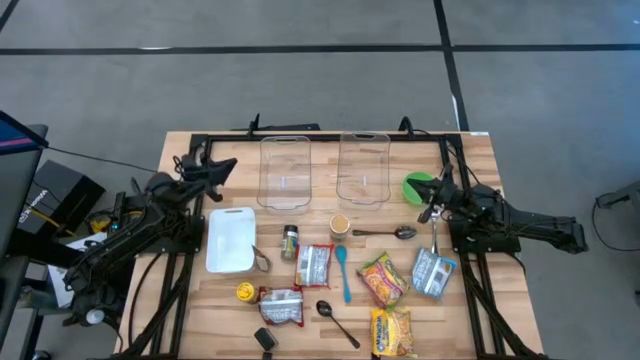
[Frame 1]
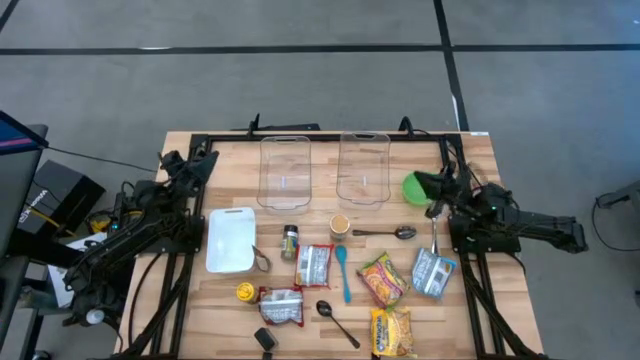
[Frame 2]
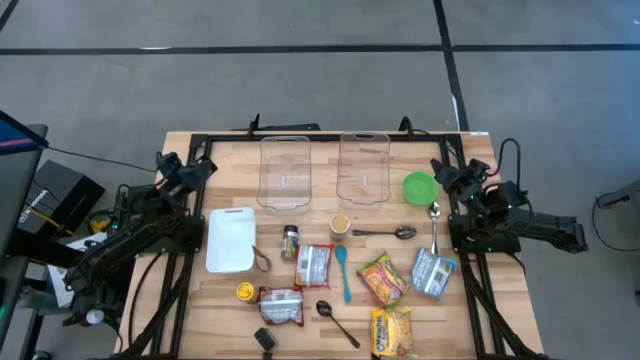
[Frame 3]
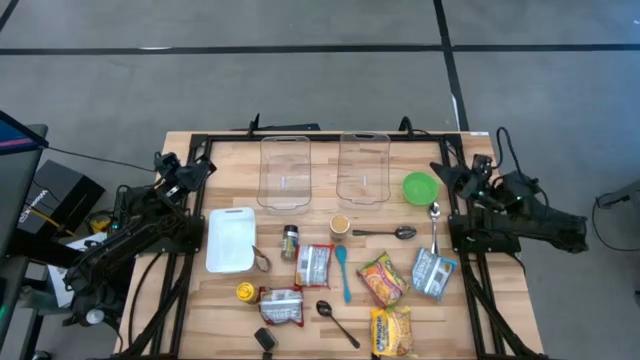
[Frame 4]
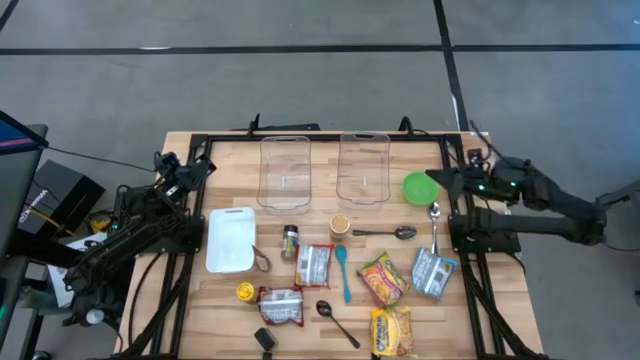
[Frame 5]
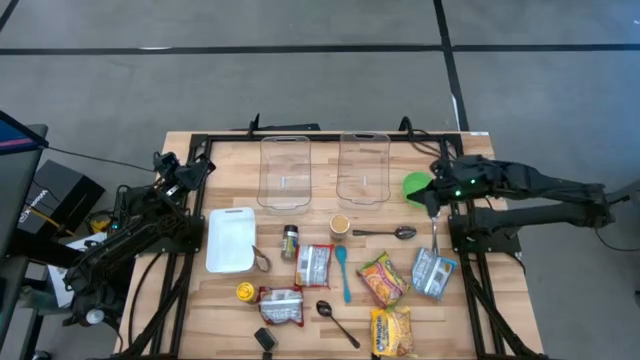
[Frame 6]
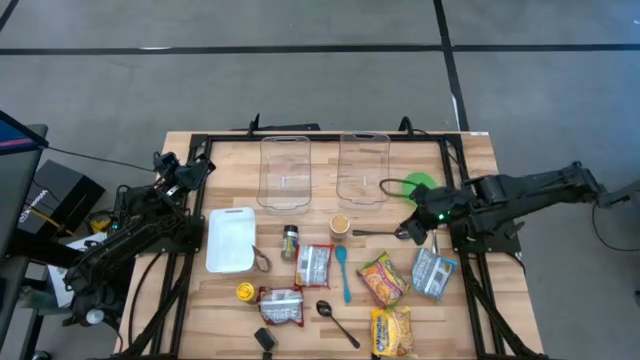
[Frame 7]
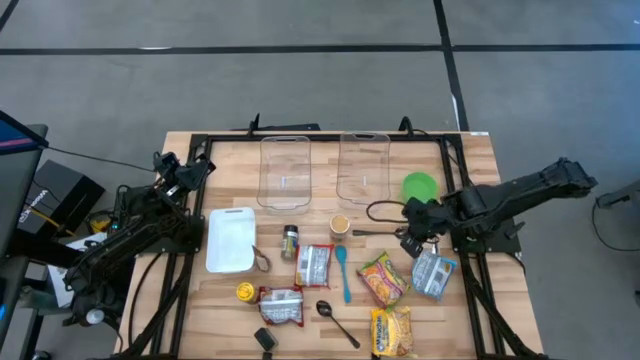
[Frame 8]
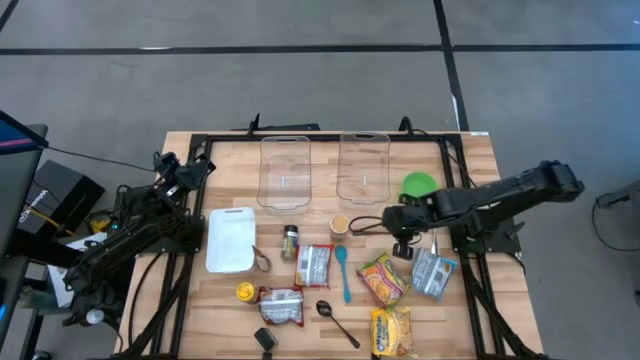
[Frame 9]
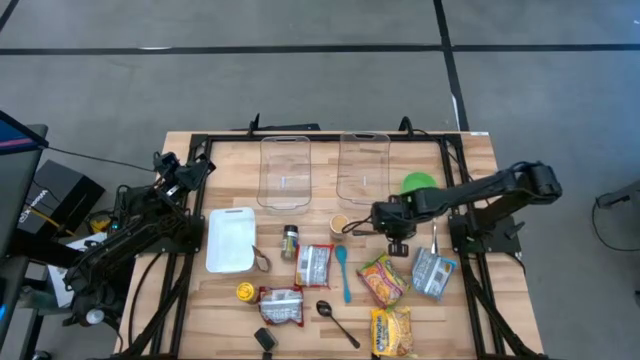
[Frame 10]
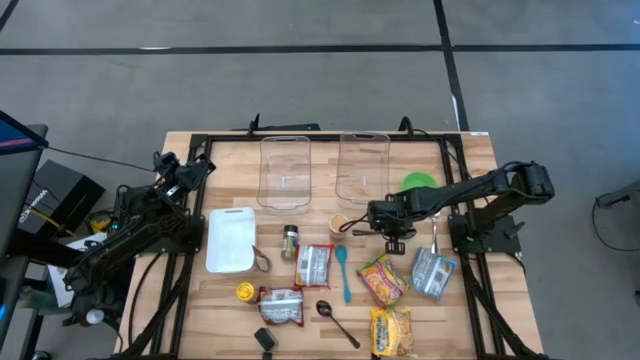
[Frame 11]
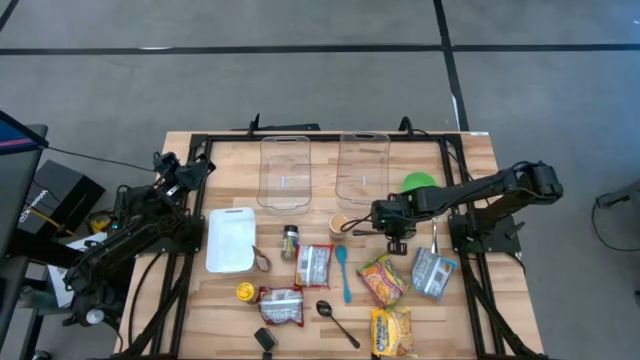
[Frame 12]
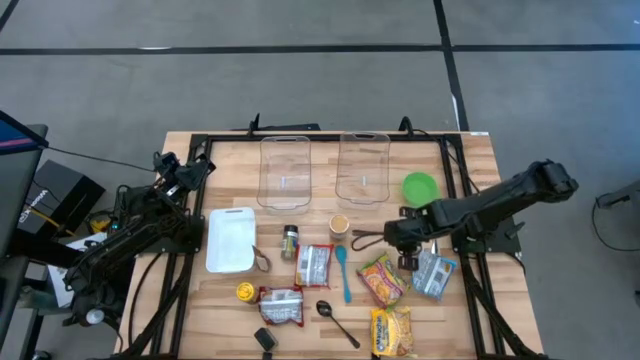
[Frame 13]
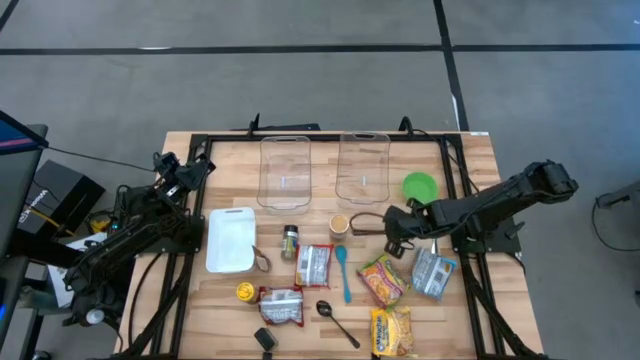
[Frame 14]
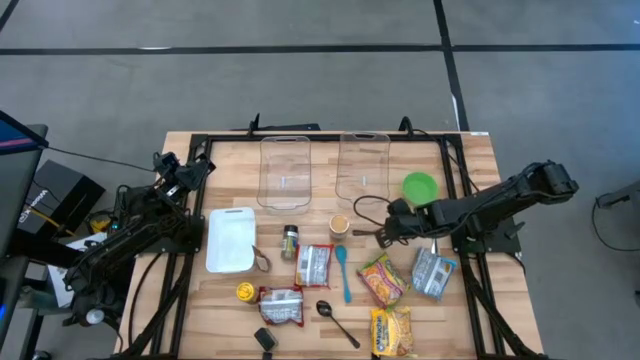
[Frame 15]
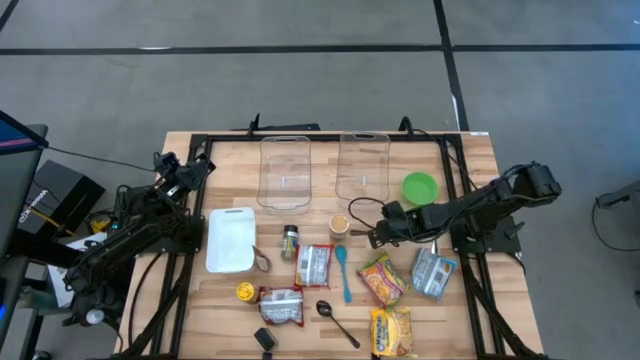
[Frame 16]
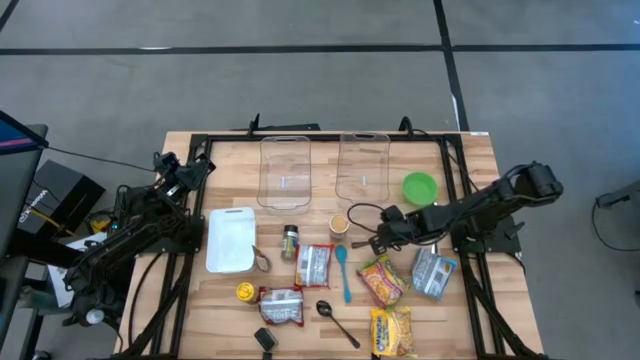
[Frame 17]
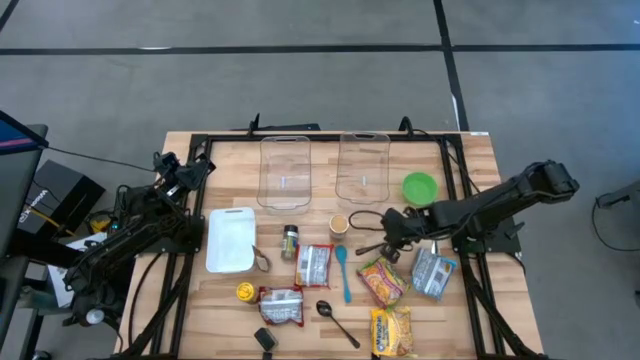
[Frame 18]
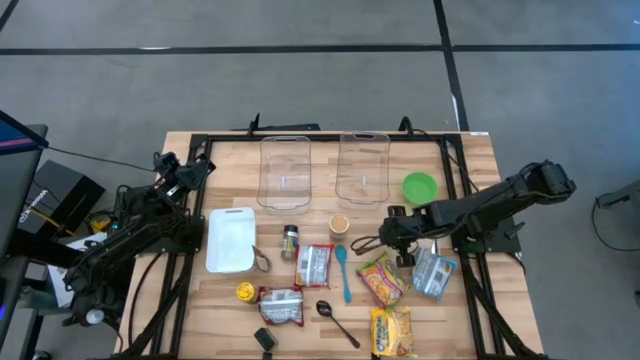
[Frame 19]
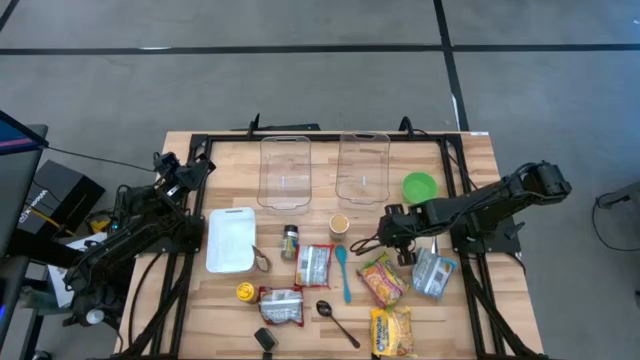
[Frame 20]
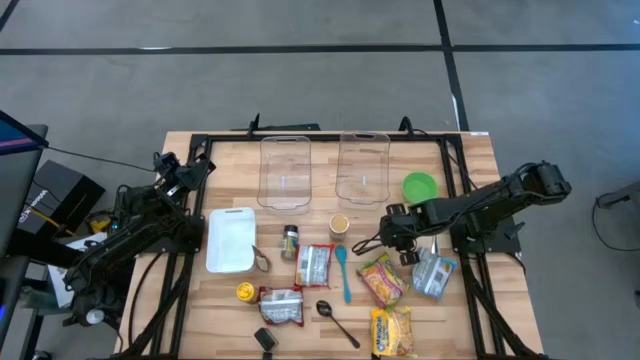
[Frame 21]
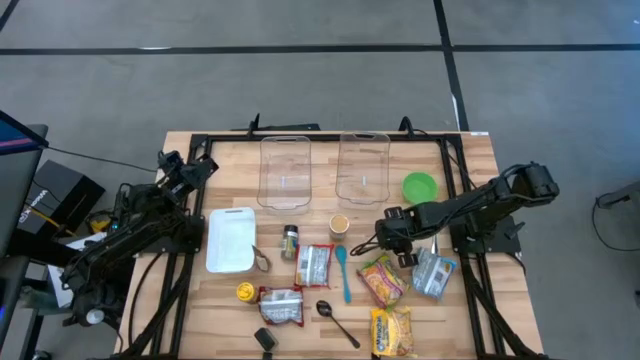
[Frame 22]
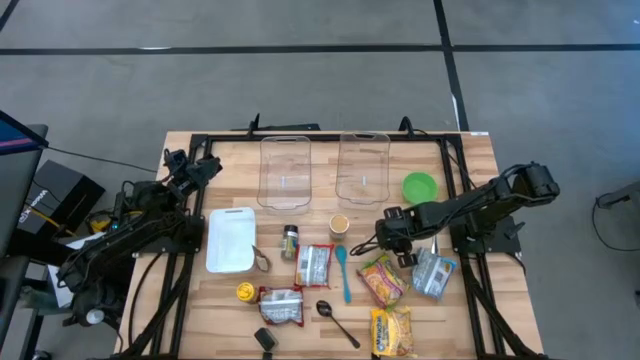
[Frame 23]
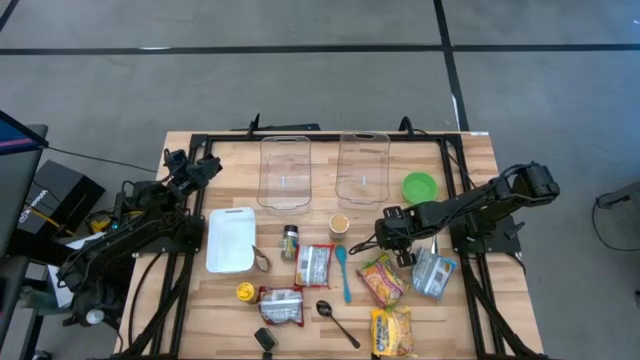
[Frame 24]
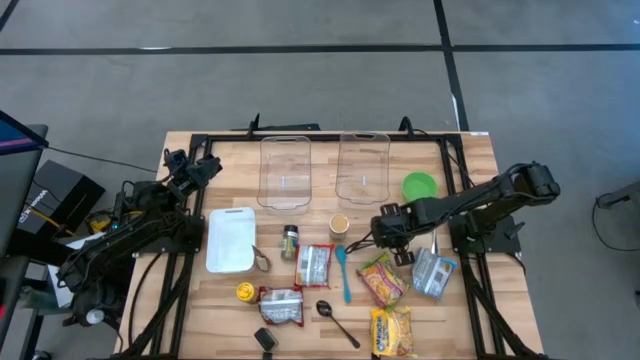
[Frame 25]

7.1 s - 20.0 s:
Task: Pick & Place Food Item
Put the top black spoon into the white bin

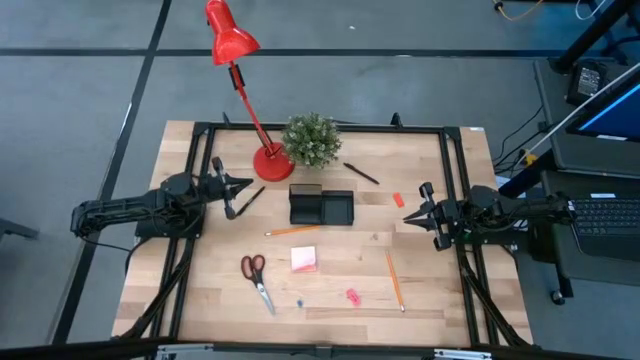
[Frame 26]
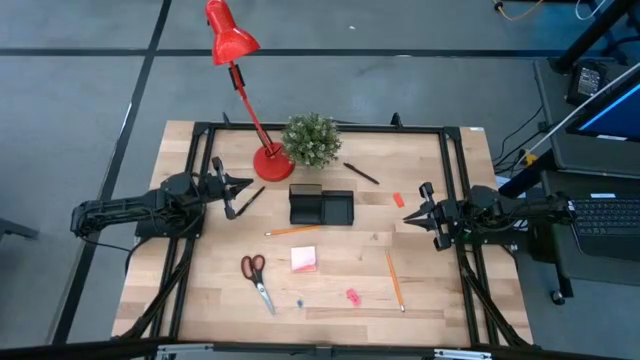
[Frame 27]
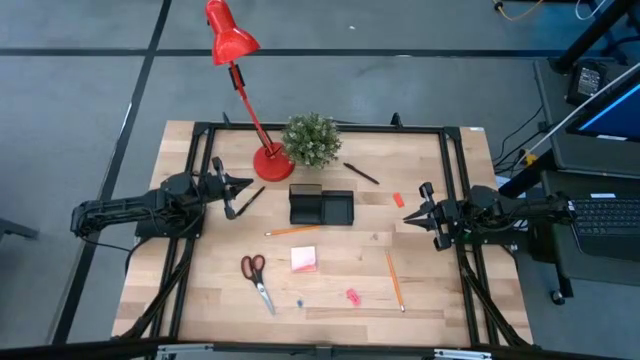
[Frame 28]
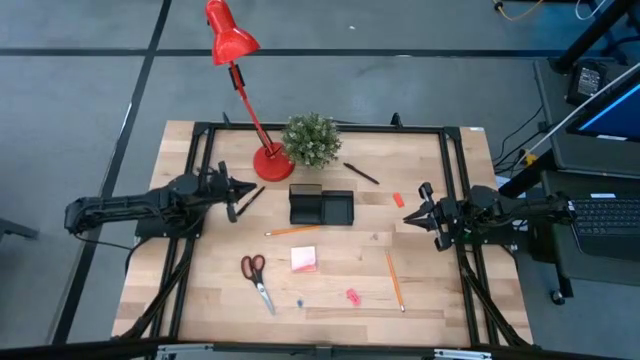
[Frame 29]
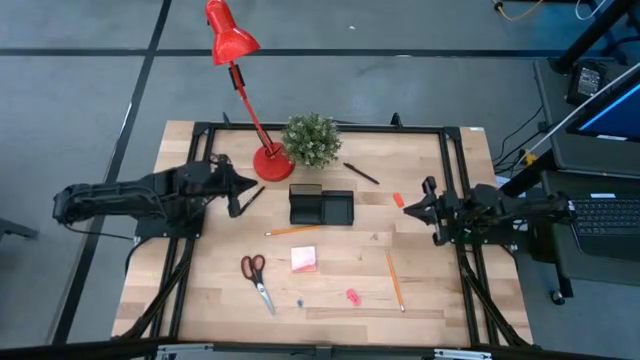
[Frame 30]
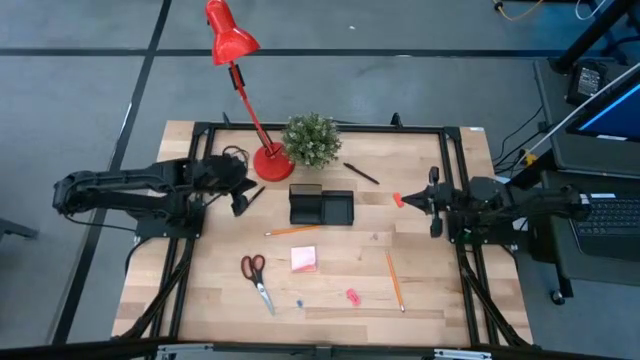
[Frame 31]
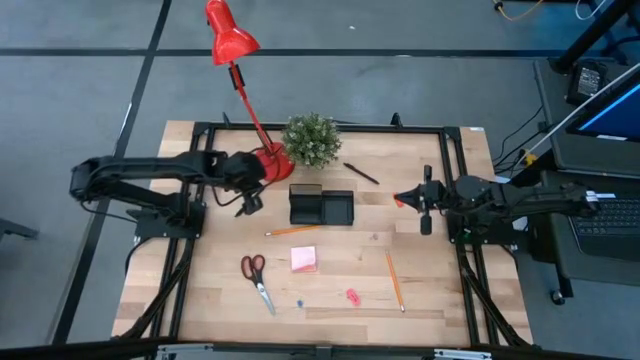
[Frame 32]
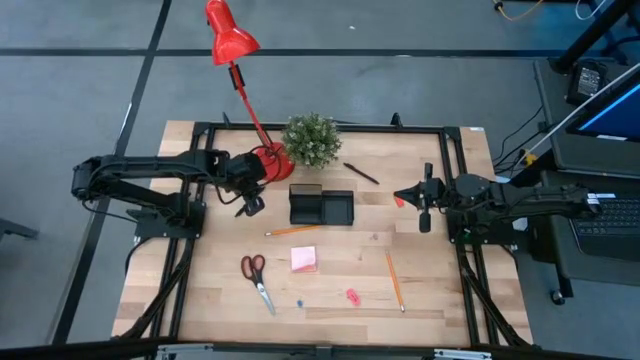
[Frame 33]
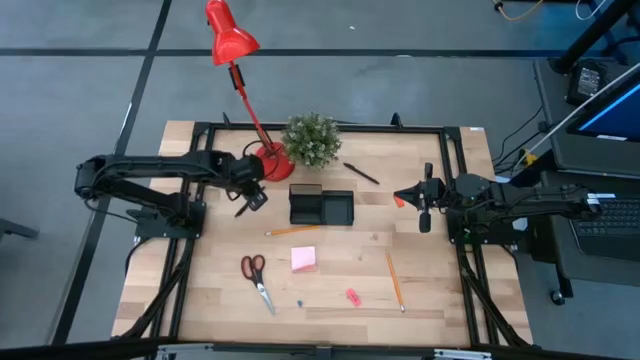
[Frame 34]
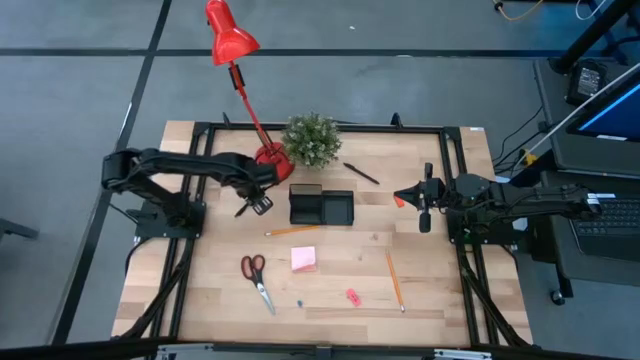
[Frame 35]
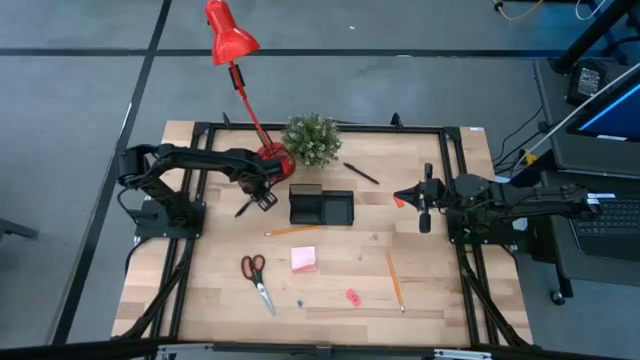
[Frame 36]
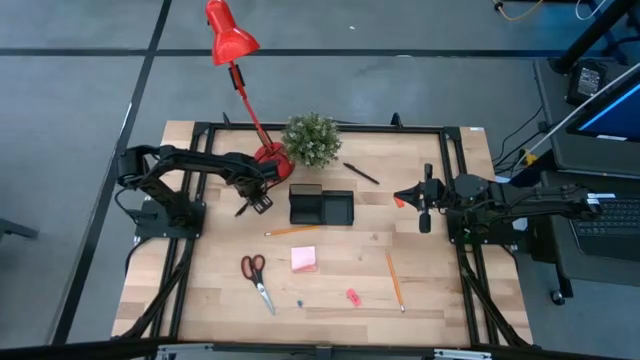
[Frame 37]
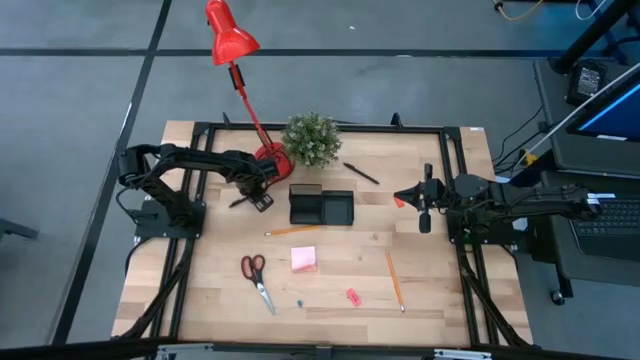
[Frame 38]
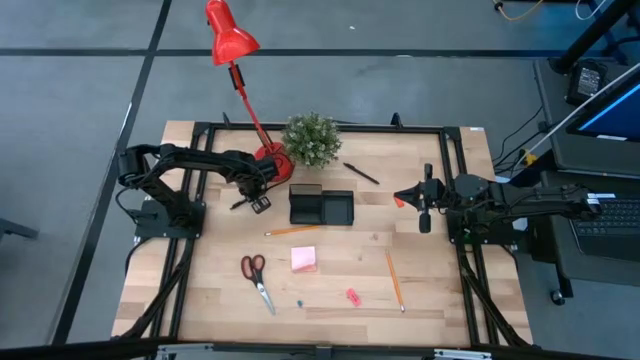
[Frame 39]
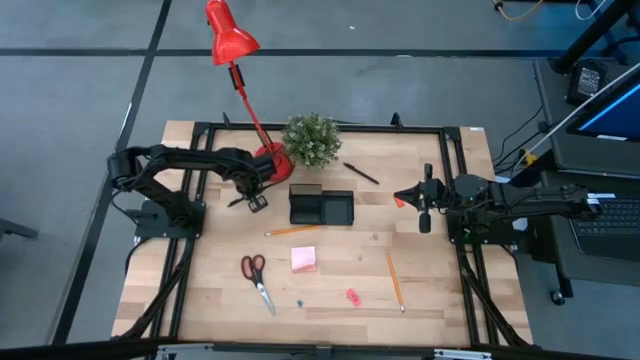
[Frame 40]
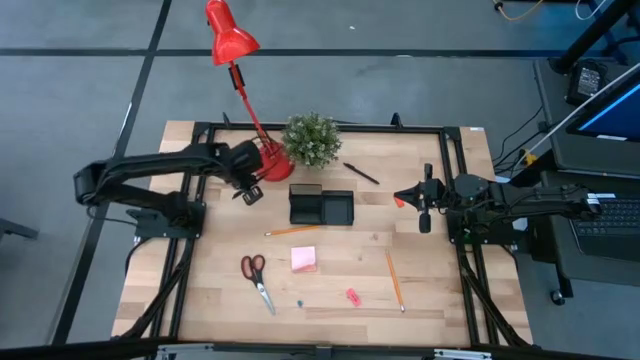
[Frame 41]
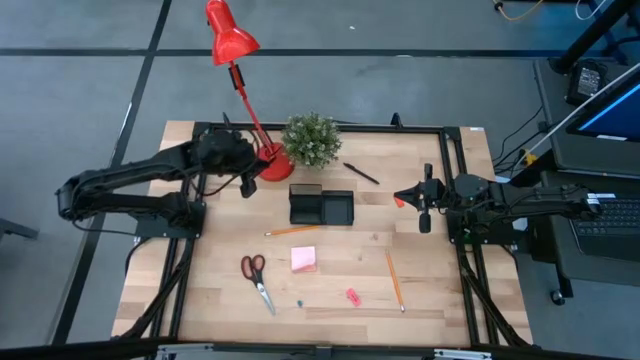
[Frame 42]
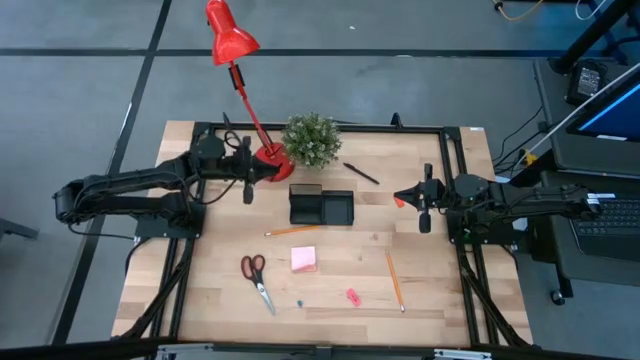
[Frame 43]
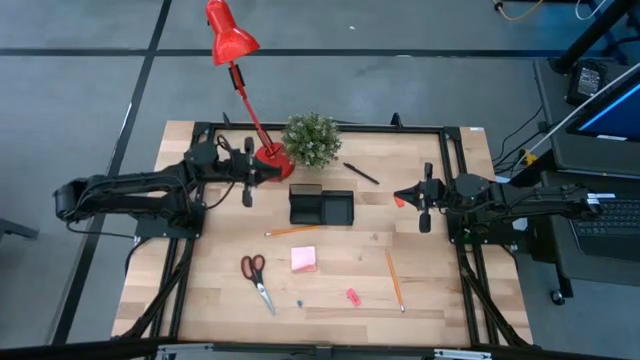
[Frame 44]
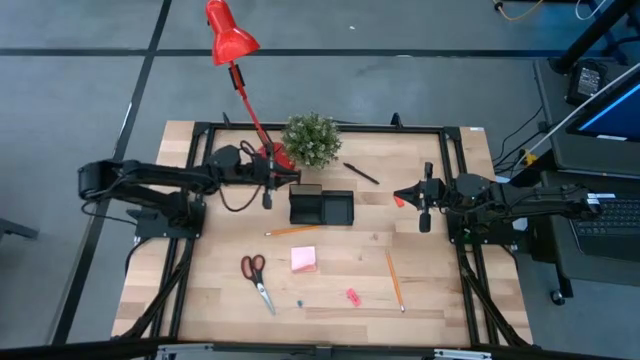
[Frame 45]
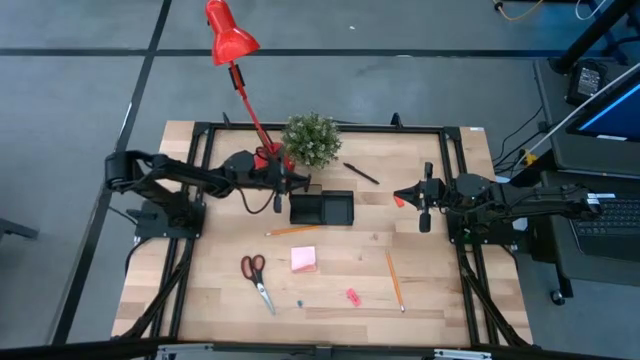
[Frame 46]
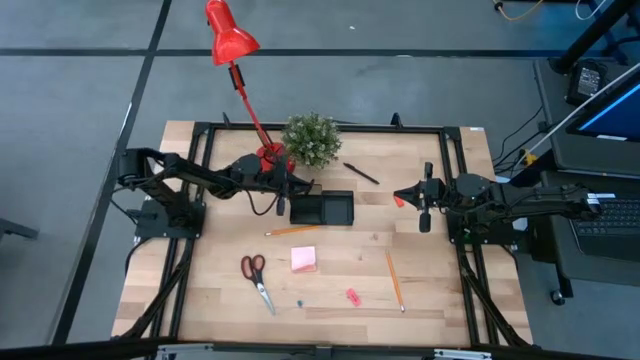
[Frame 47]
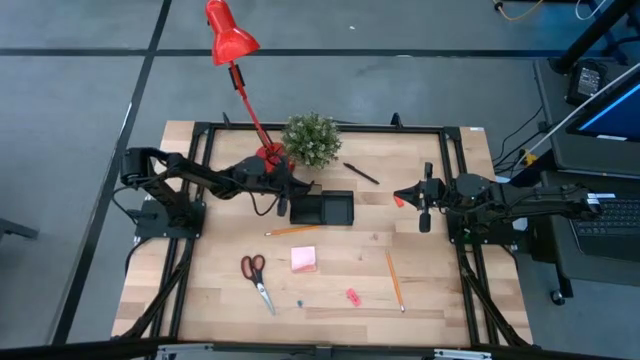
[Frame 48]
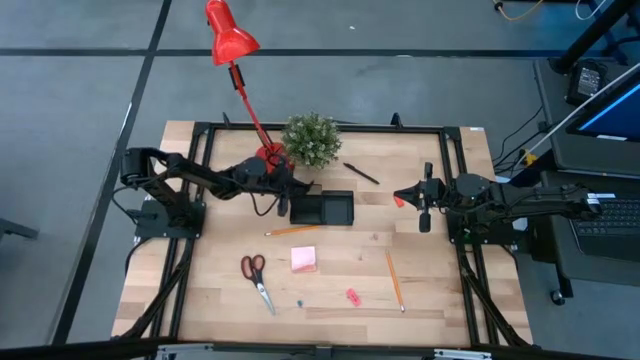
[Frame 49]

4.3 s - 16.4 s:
Task: Pick and place office supplies into organizer
Put the black pen into the black desk organizer
